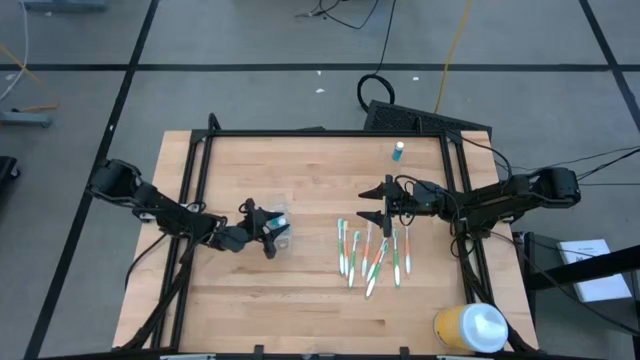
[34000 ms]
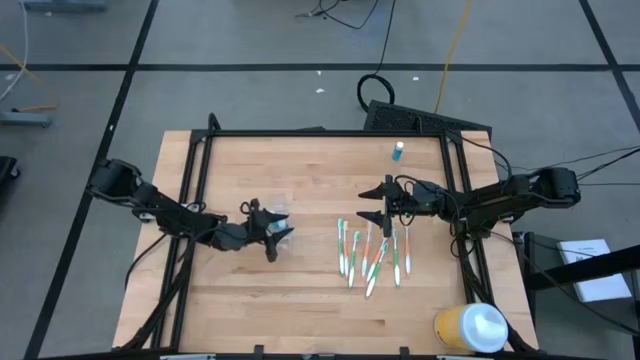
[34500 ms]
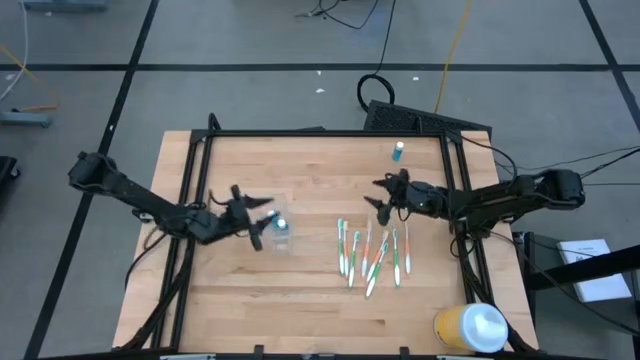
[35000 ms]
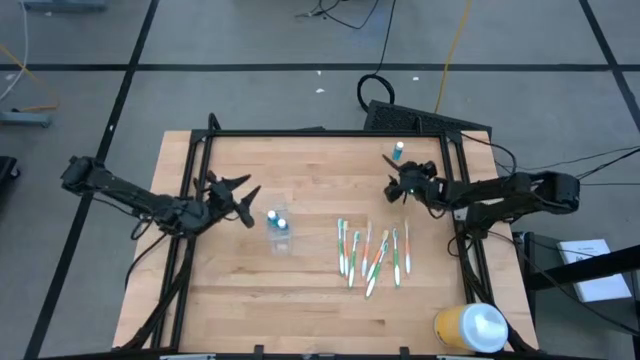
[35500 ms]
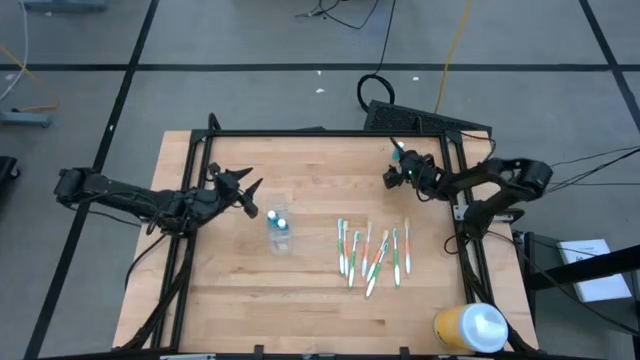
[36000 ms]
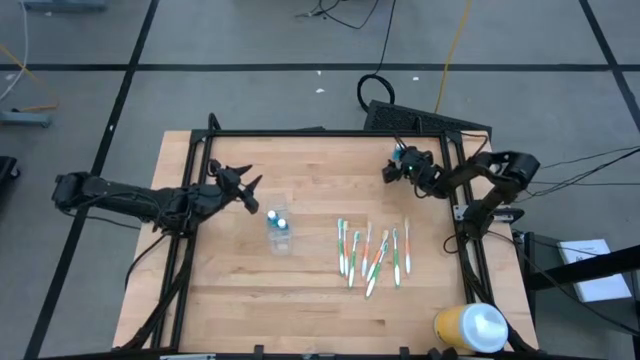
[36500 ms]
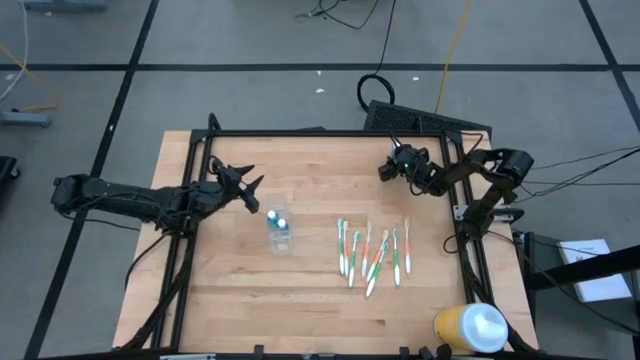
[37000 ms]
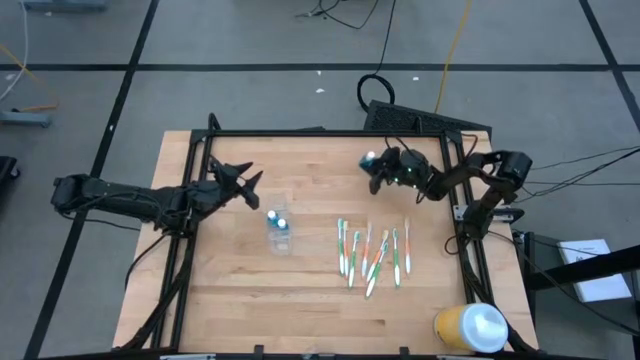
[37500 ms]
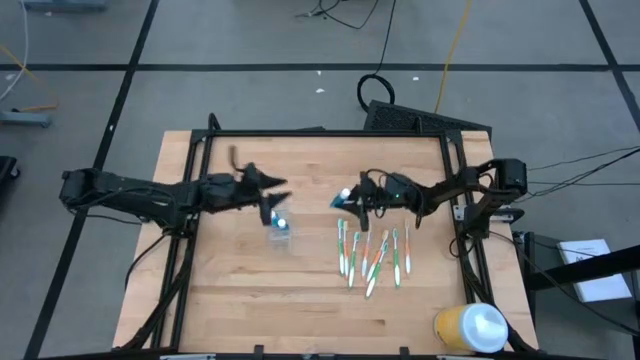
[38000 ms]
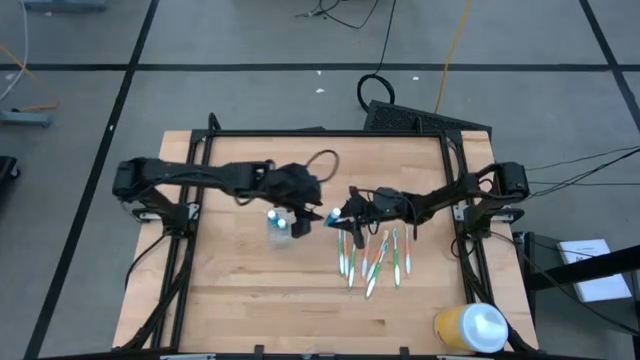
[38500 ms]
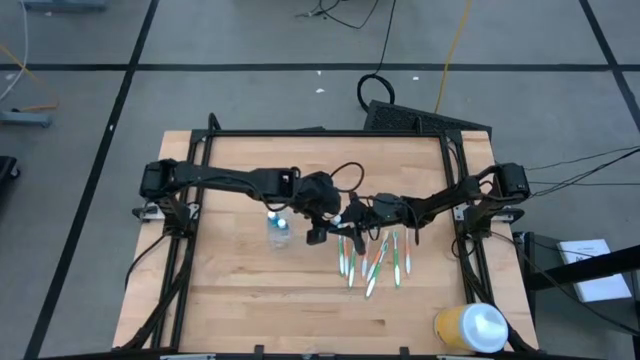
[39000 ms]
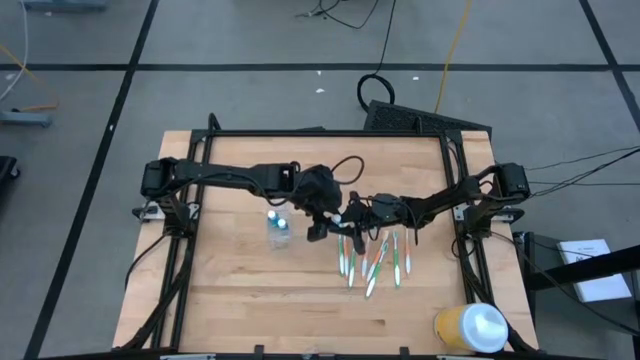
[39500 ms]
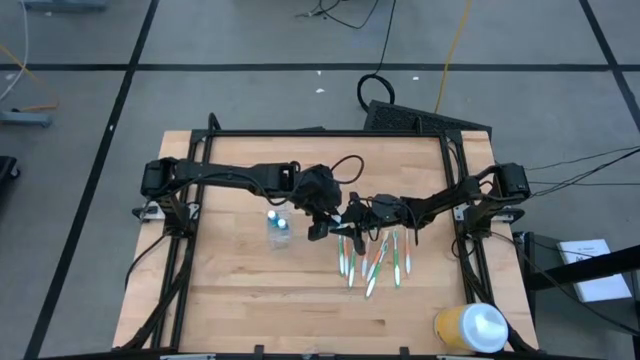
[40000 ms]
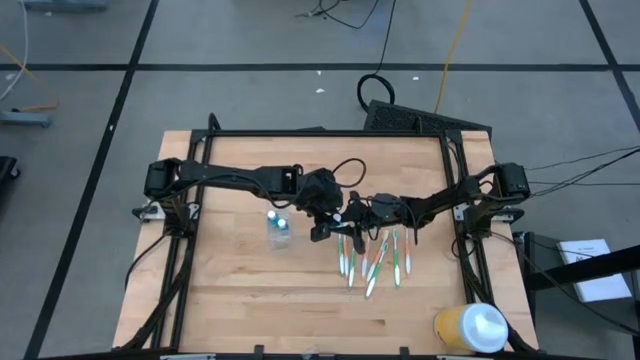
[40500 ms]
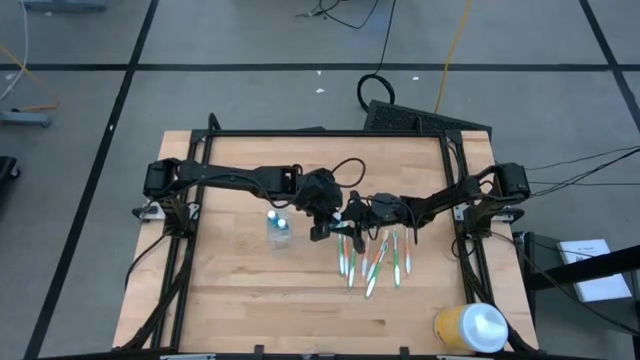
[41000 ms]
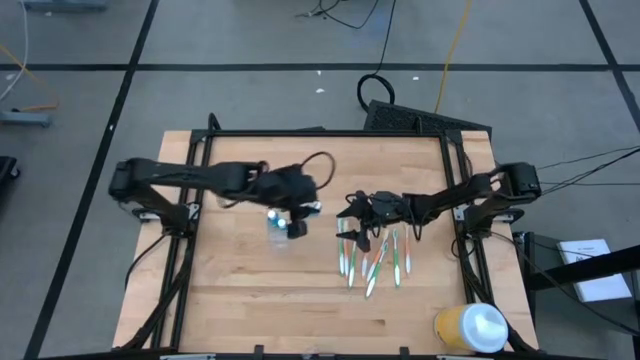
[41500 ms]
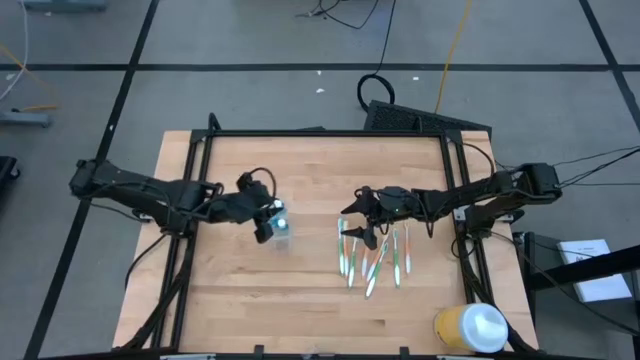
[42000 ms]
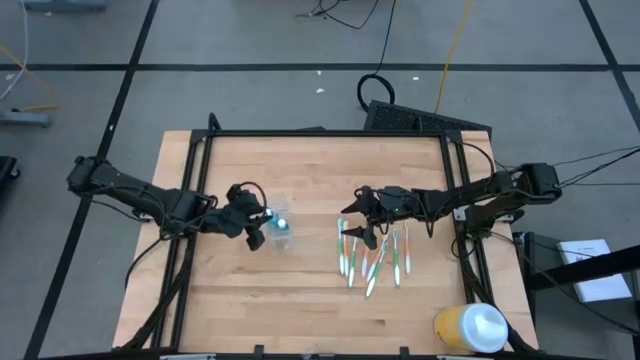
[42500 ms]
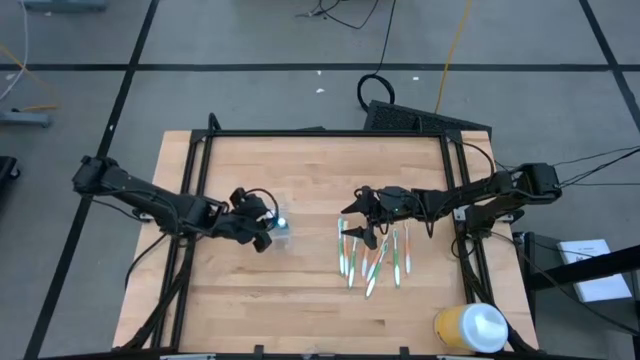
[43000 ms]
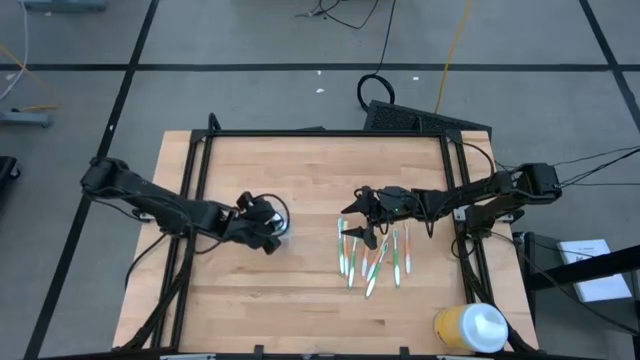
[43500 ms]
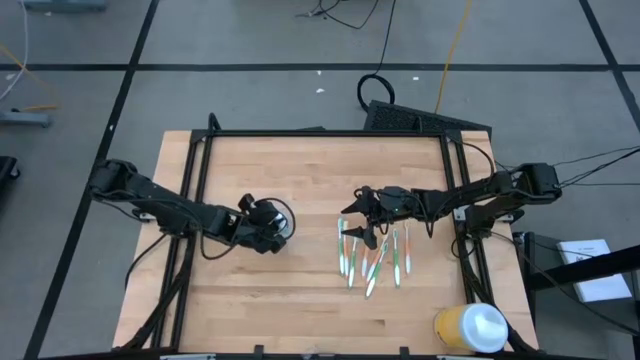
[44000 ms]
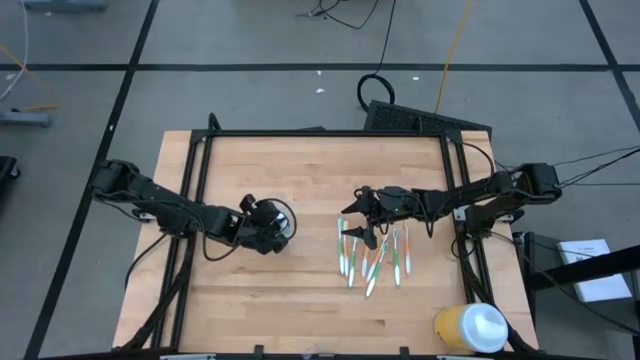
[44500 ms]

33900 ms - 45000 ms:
Task: Pick & Place toothbrushing station
Put the blue mouthwash in the transparent organizer

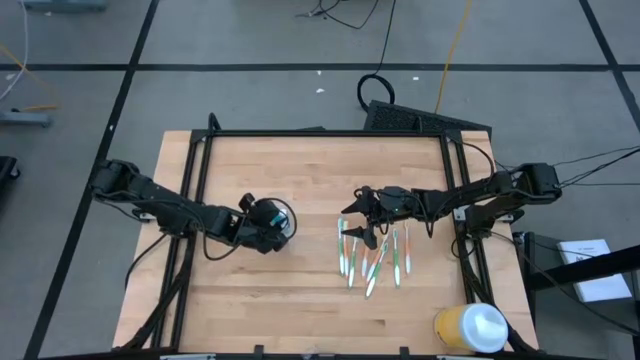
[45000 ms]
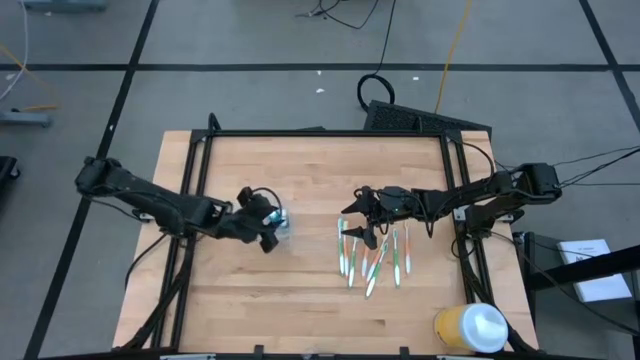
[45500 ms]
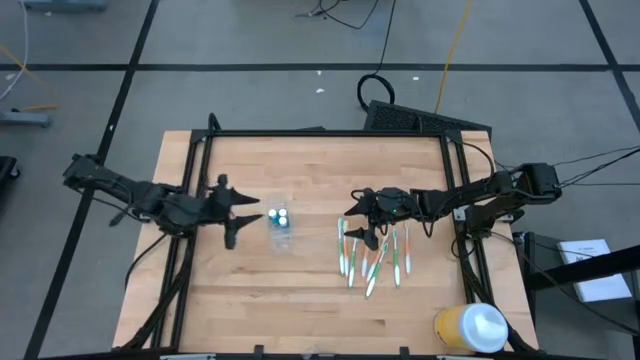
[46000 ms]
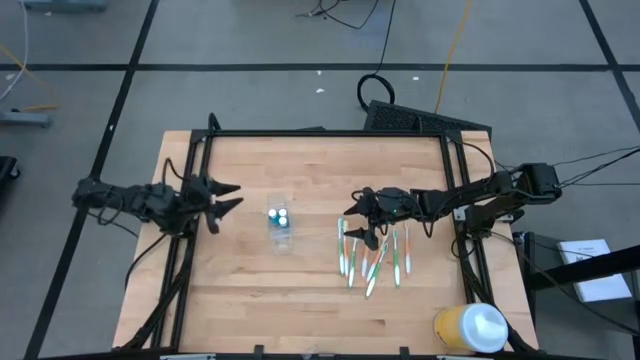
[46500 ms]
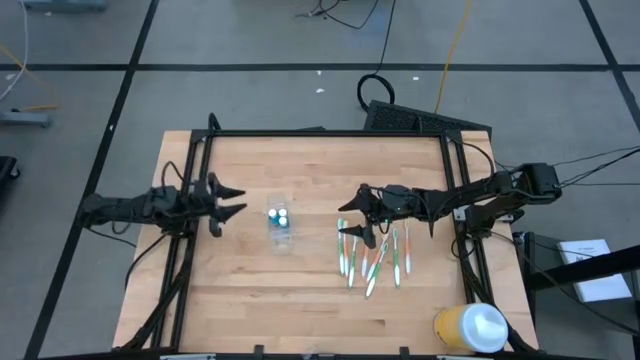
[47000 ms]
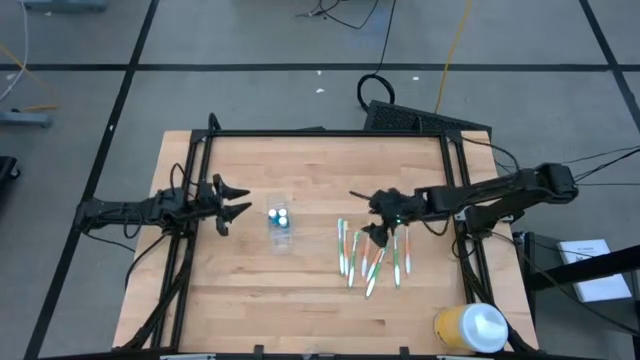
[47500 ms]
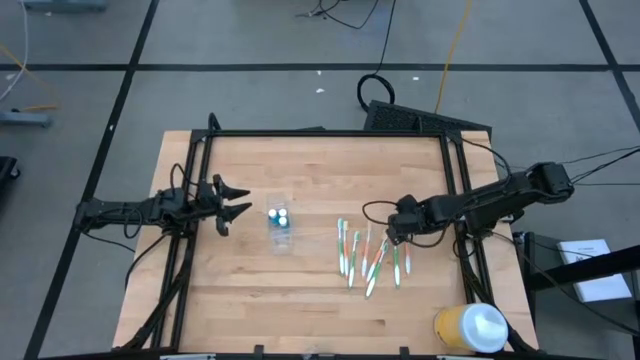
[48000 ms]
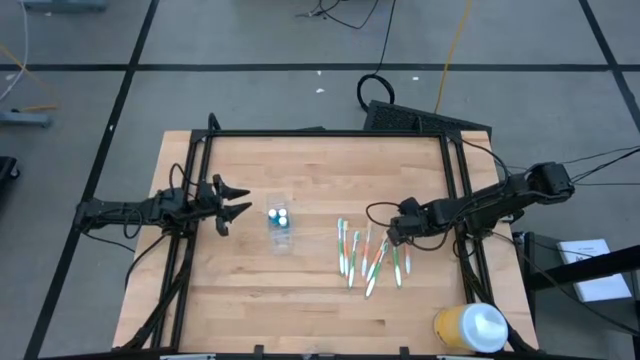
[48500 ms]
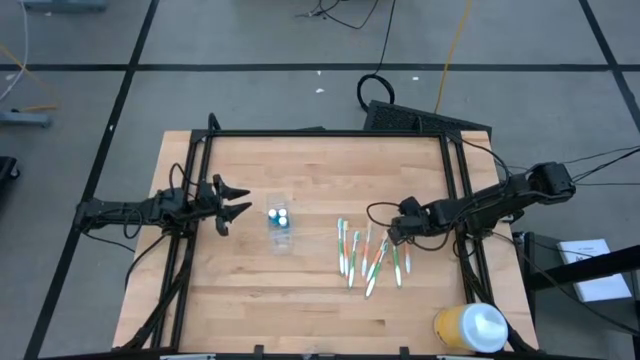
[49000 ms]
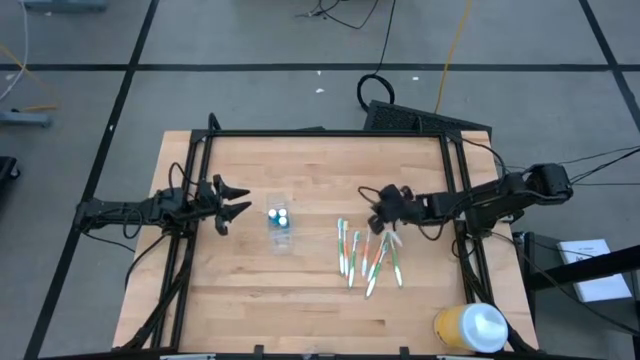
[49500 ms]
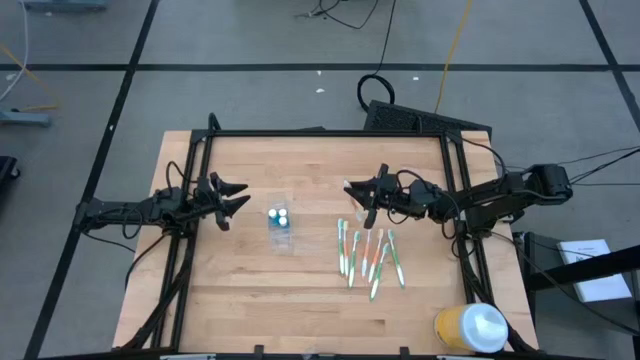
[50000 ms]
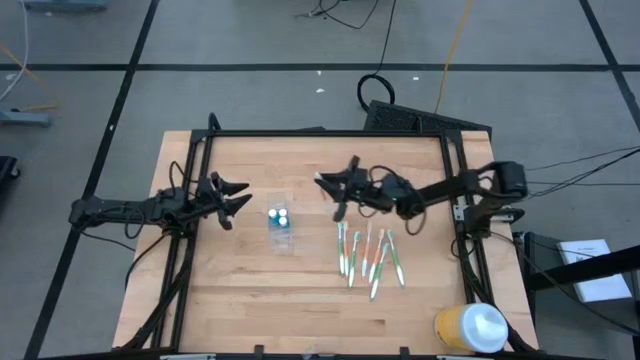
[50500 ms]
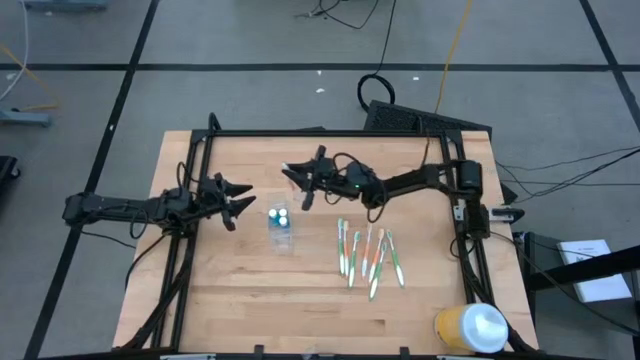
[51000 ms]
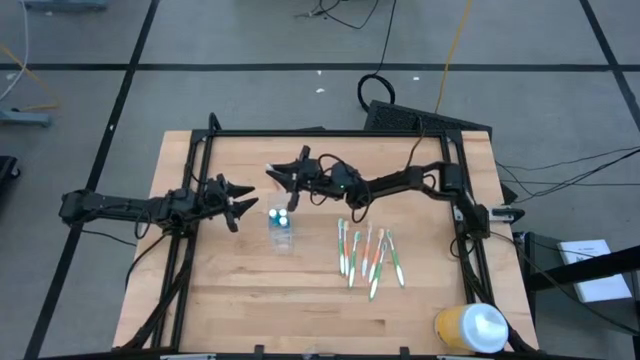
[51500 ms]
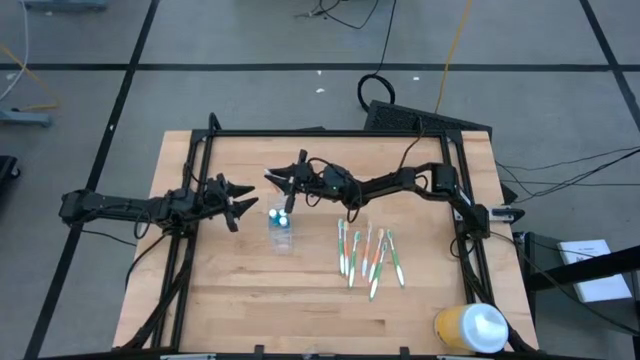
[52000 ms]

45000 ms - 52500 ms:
Put the orange toothbrush in the transparent organizer

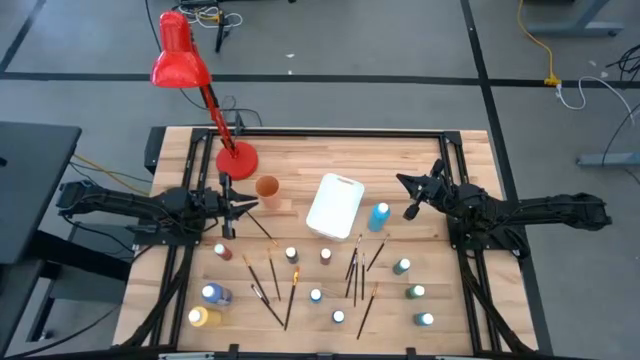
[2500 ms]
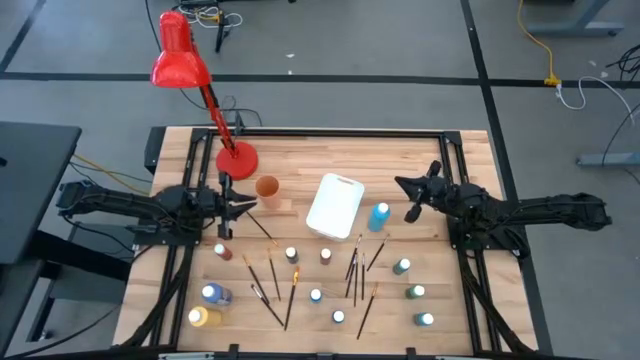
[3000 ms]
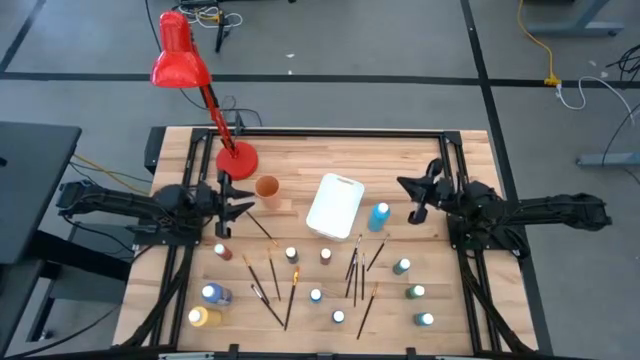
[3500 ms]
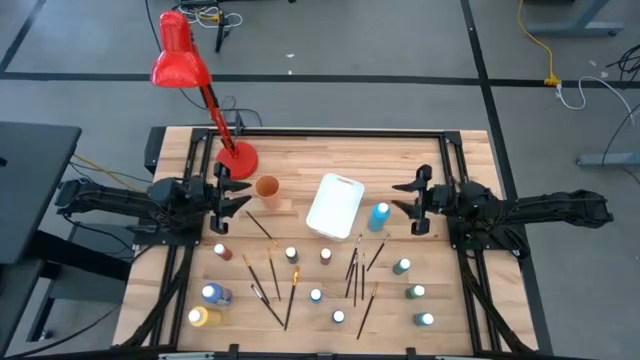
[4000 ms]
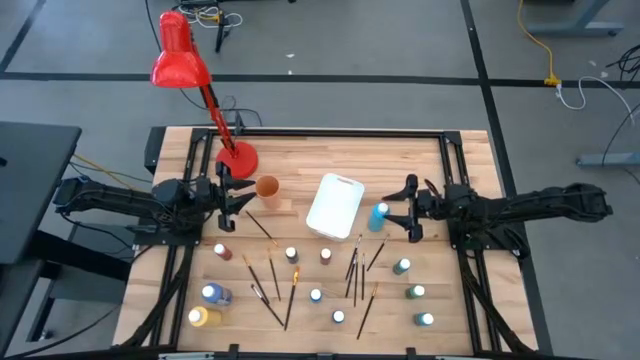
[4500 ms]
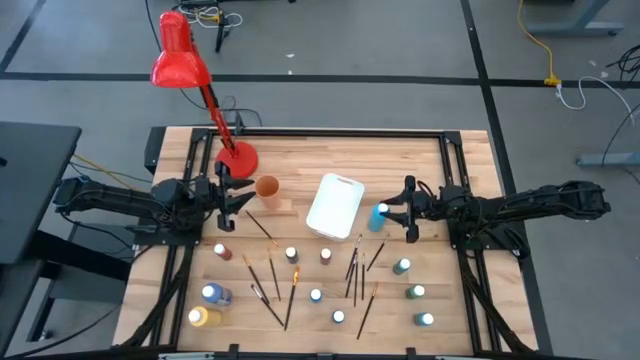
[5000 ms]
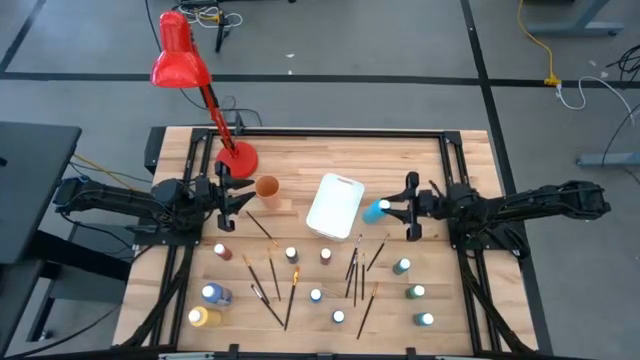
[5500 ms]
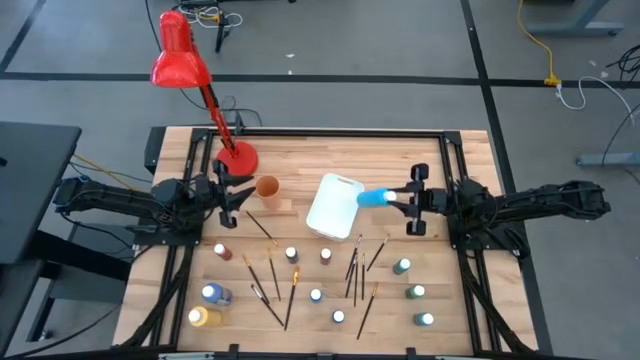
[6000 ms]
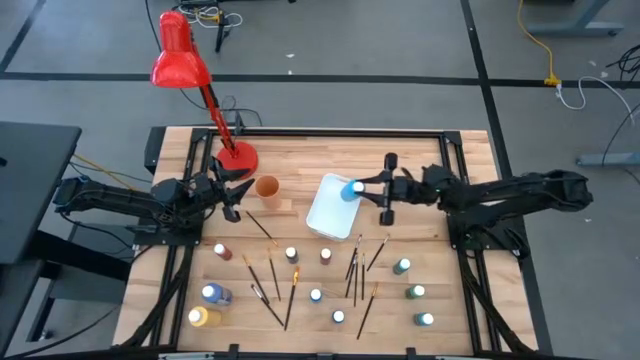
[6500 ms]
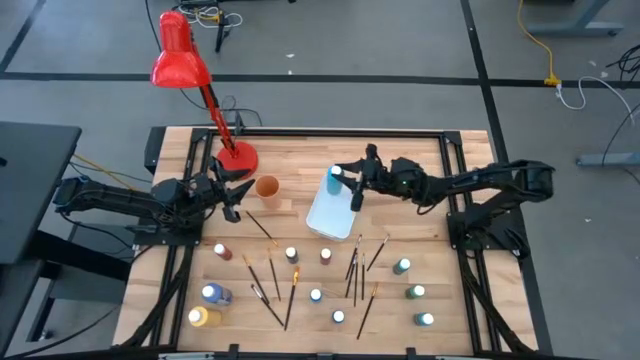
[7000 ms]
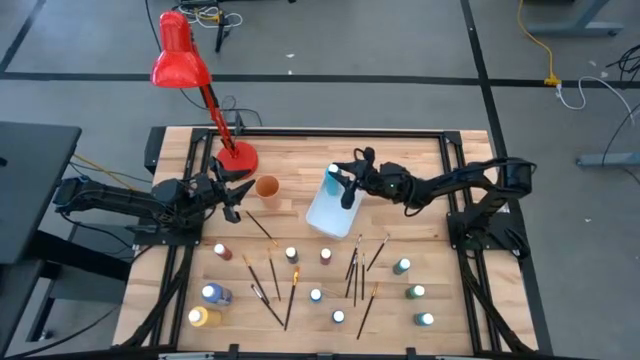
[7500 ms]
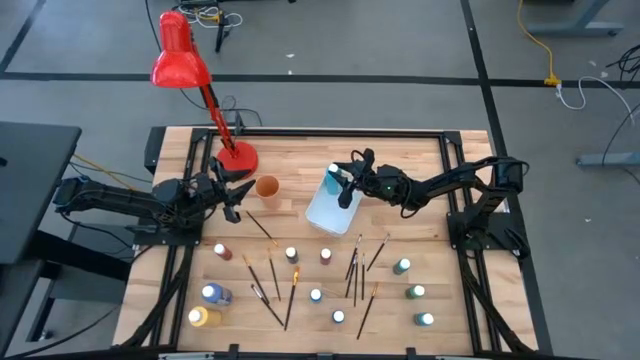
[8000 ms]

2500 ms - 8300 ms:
Task: Pick & Place Paint Supplies
Put the large light blue paint bottle into the white bin
